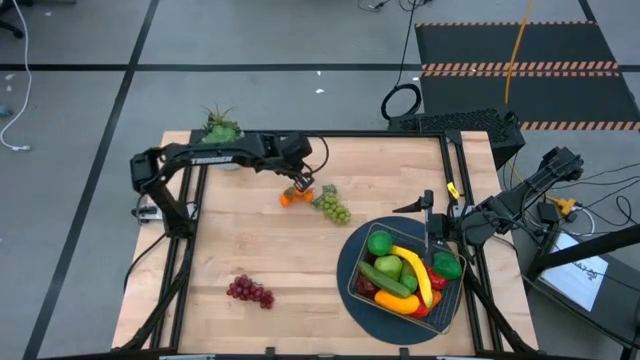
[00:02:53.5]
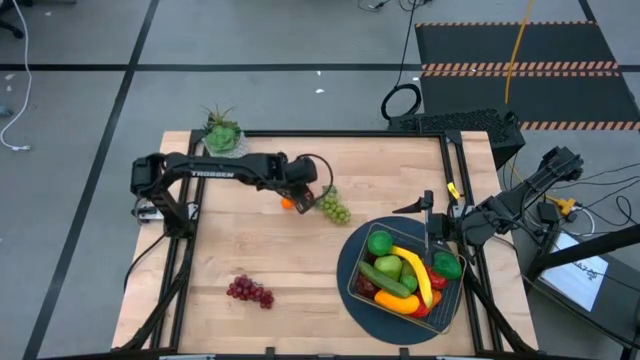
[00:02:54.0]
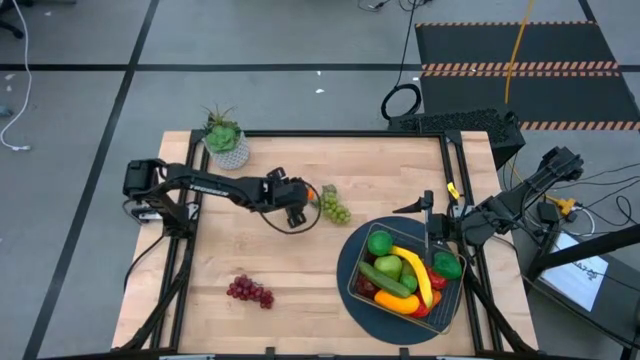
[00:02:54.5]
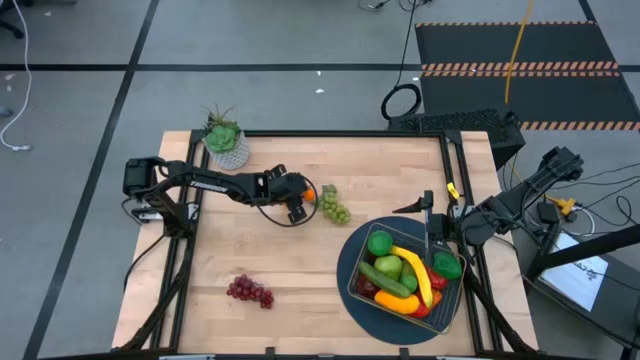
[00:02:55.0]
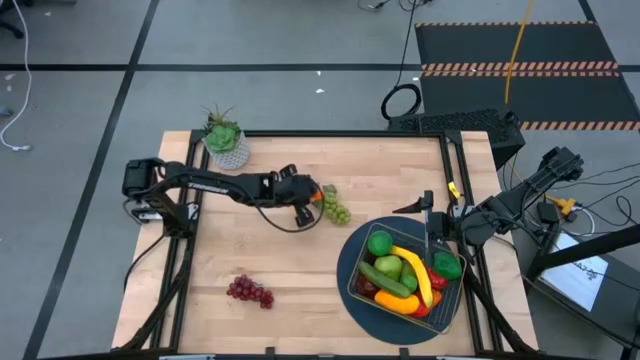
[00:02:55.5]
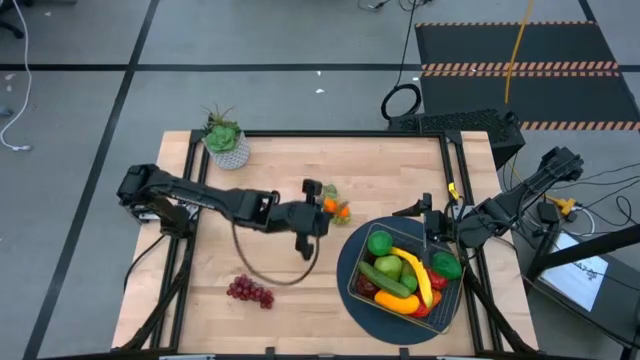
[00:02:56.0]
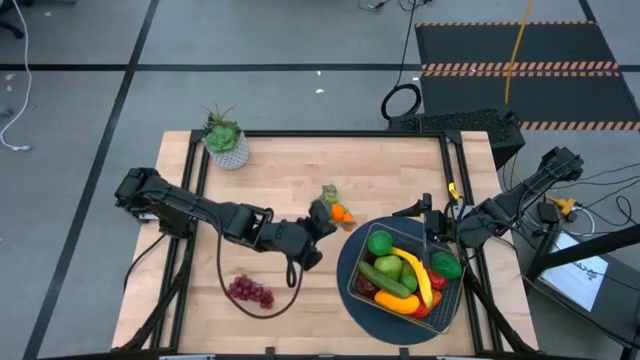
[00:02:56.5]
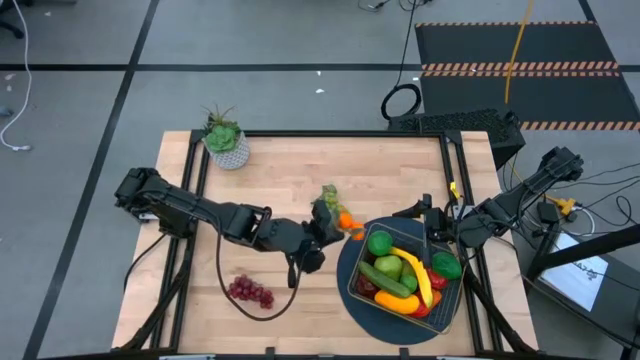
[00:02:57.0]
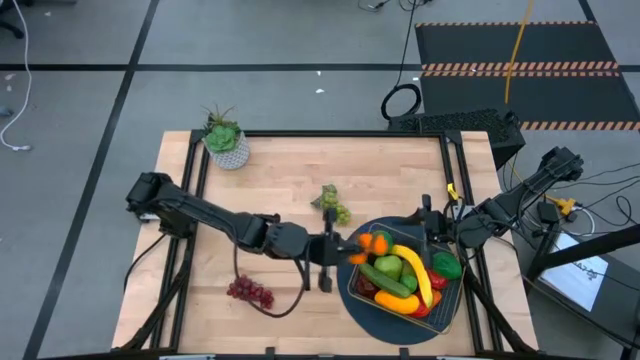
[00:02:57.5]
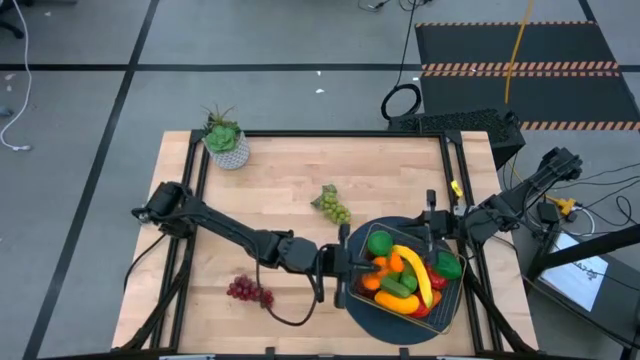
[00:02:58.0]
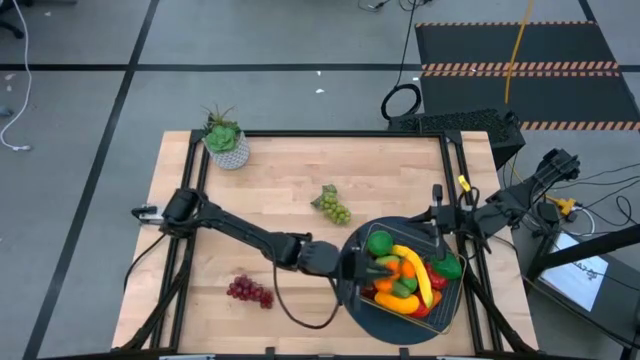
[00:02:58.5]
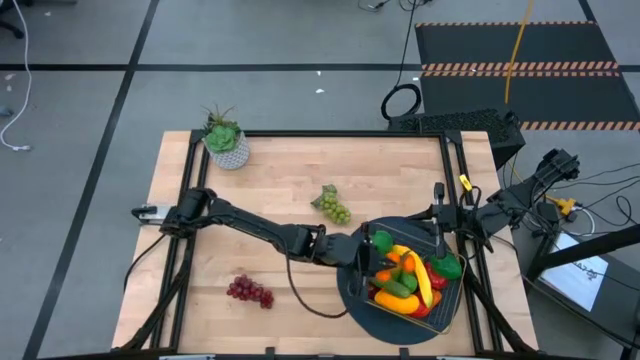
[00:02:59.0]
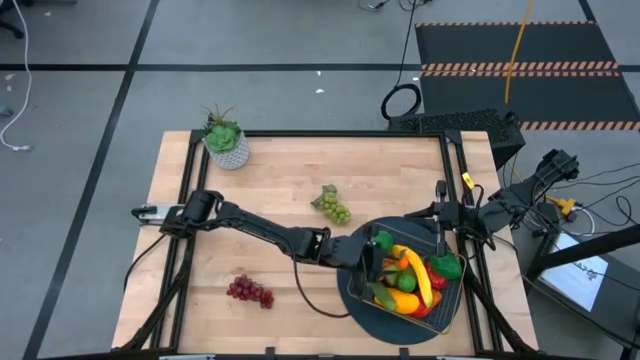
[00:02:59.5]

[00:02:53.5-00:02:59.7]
Task: Build produce basket
Put the tangerine into the gold wire basket

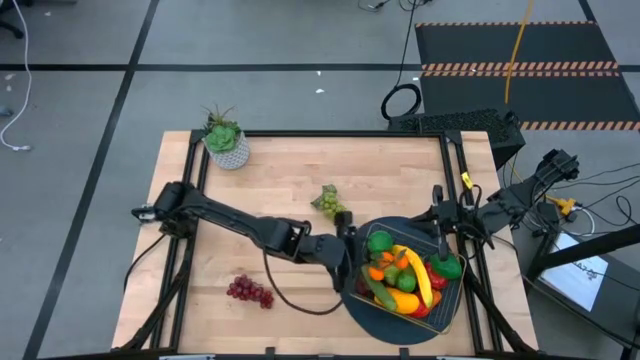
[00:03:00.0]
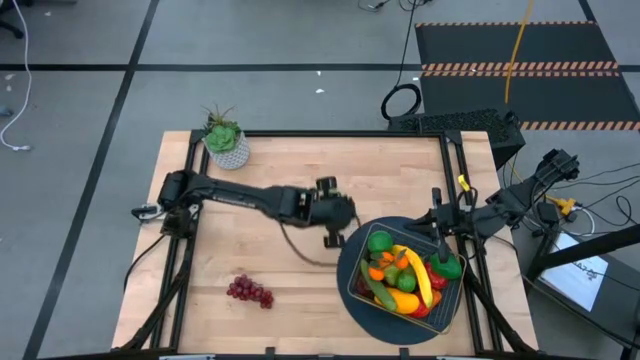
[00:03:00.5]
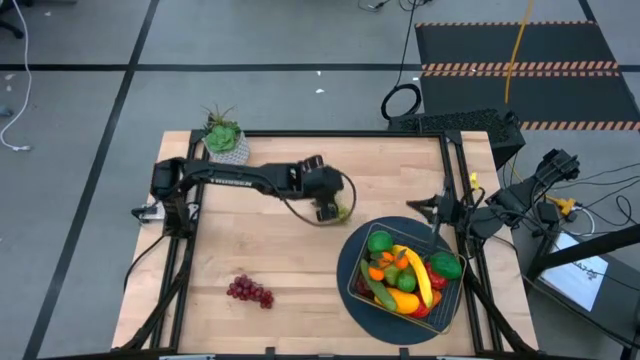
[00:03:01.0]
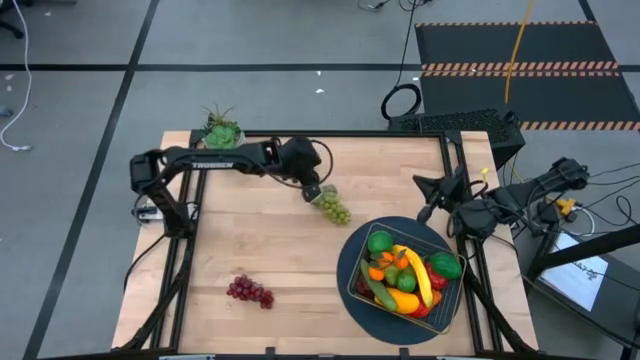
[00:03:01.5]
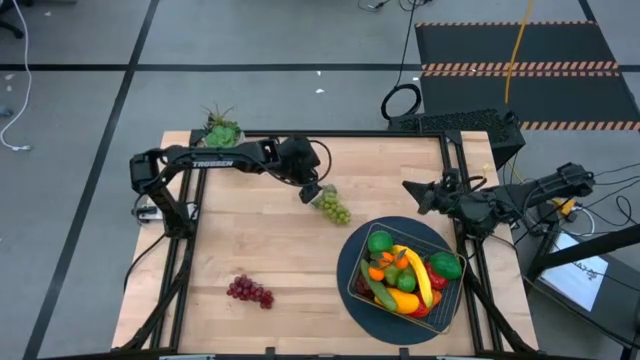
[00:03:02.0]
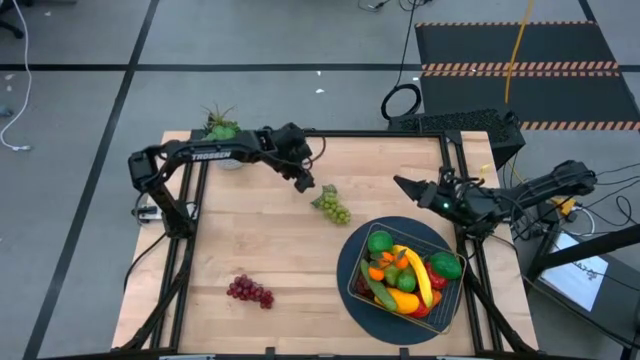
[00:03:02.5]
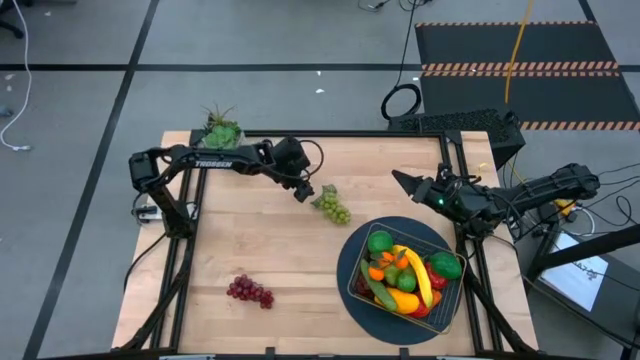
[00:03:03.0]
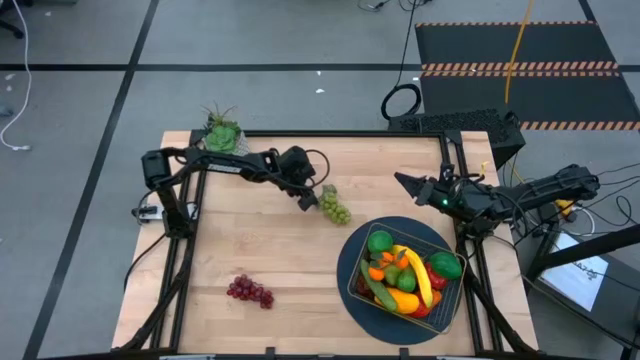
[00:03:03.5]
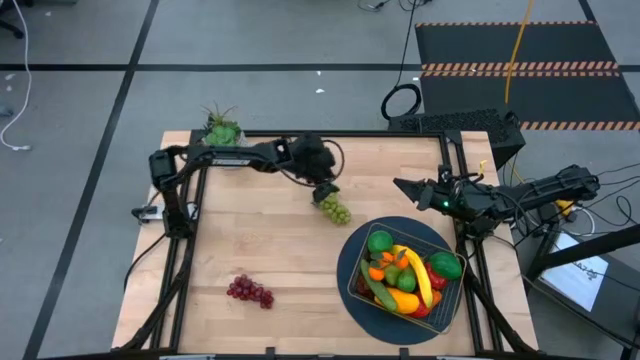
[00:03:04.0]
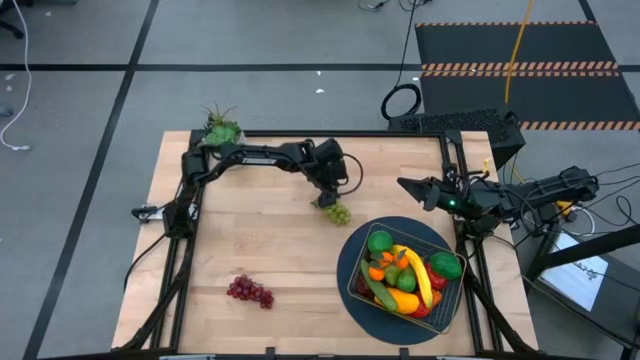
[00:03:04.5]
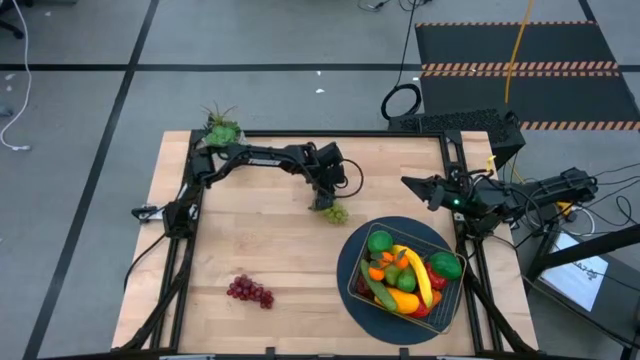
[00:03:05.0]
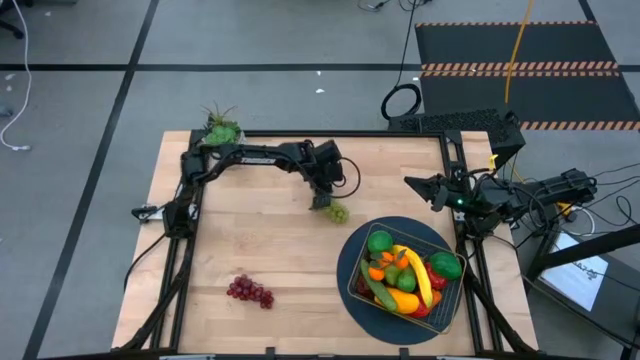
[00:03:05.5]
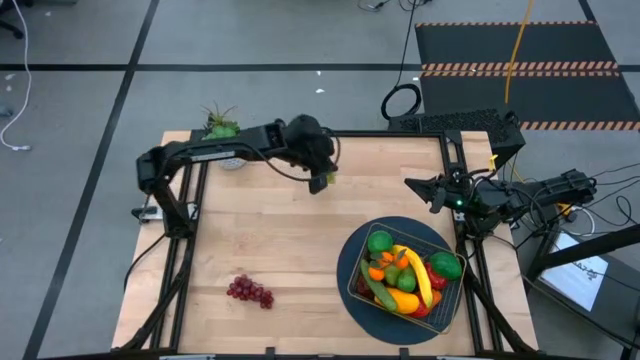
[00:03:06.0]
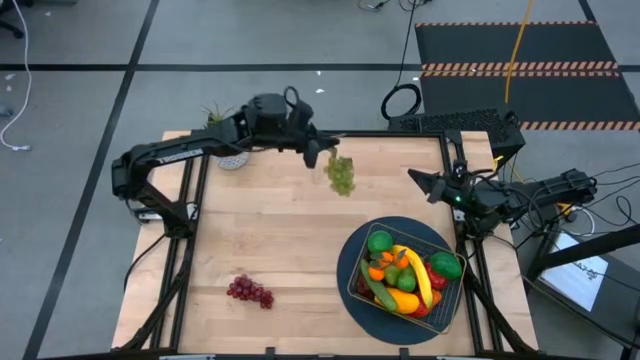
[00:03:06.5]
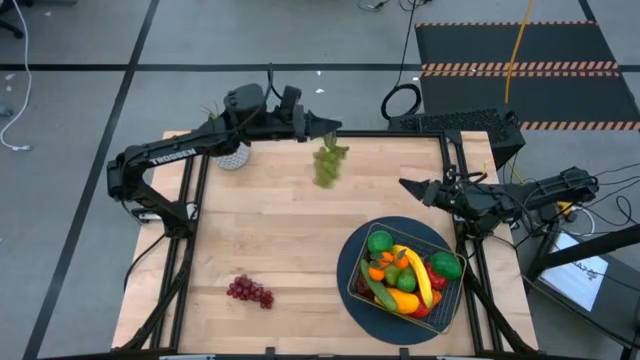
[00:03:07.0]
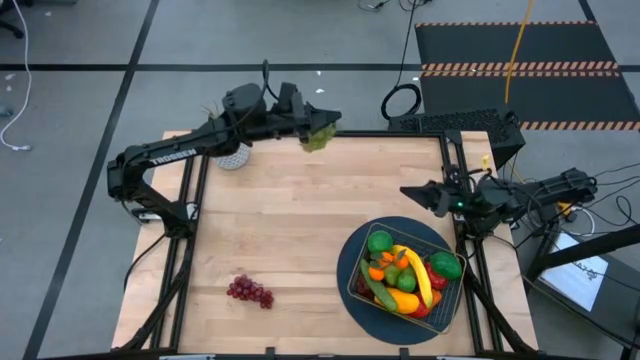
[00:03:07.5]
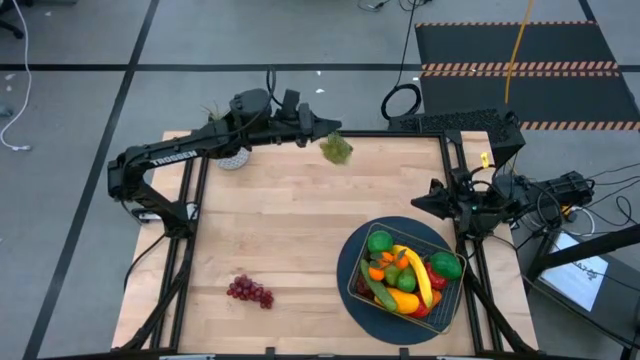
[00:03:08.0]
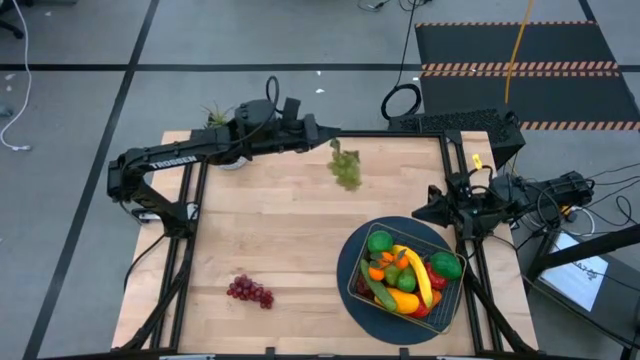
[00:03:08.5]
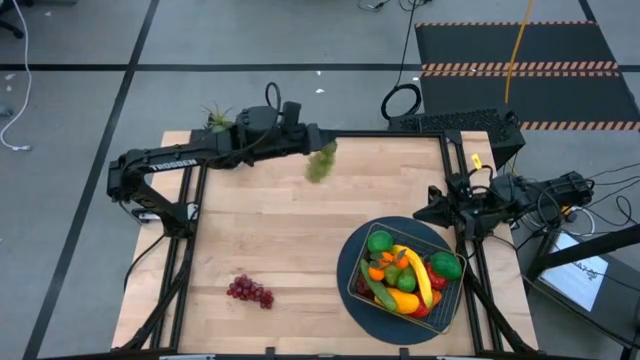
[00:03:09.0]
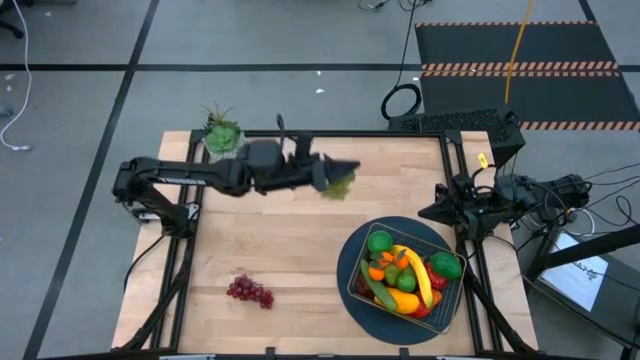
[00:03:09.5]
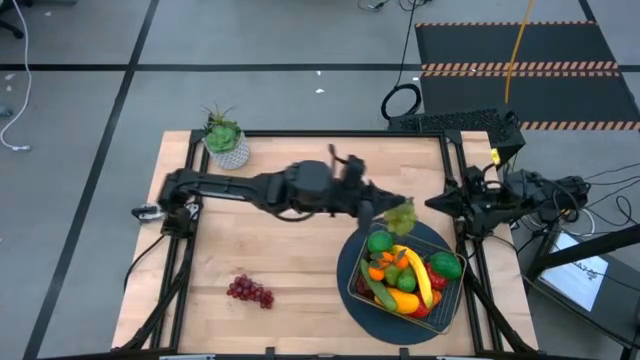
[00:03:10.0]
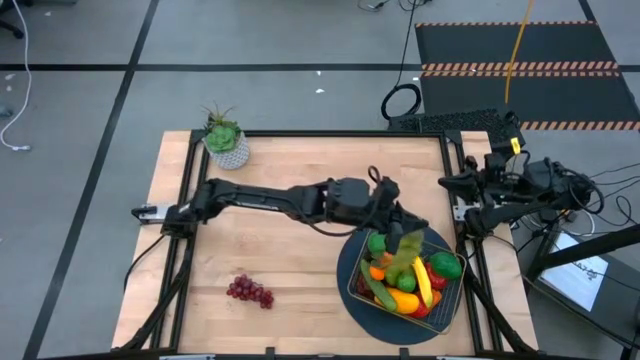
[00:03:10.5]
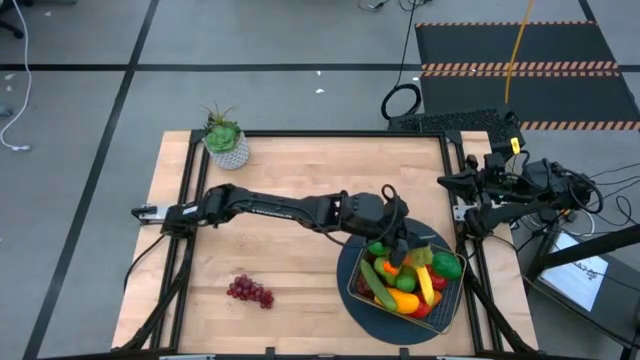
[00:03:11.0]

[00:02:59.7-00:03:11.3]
Put the top grapes into the gold wire basket

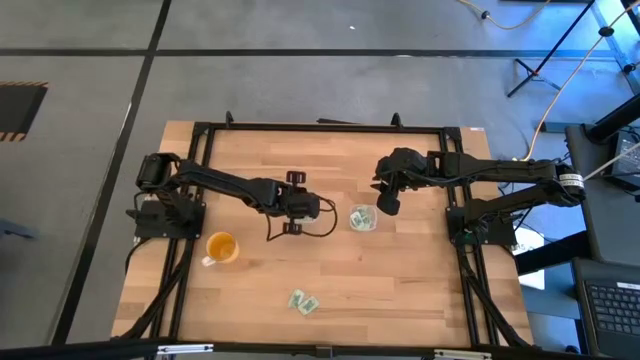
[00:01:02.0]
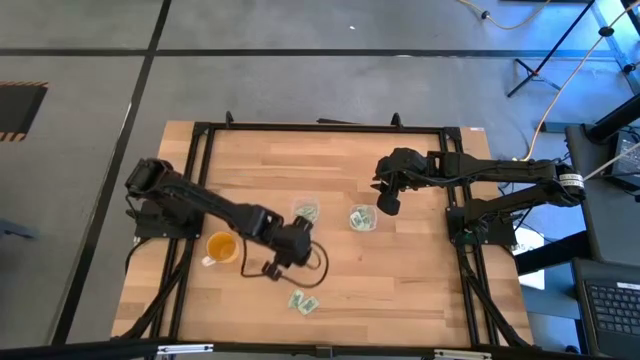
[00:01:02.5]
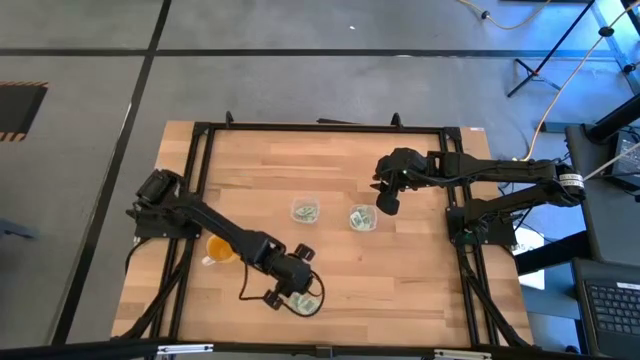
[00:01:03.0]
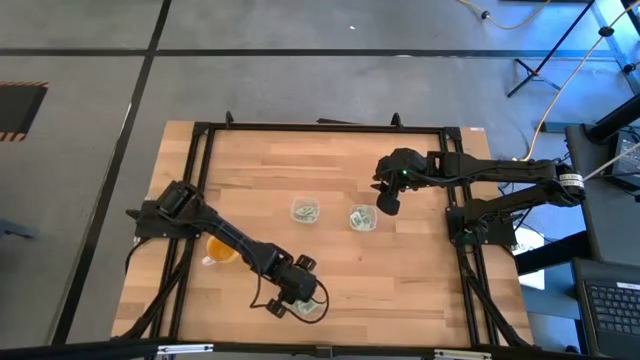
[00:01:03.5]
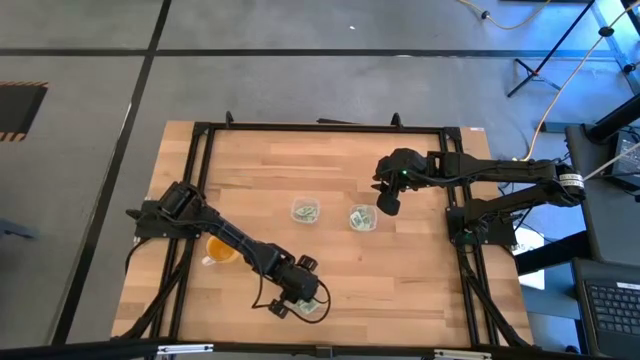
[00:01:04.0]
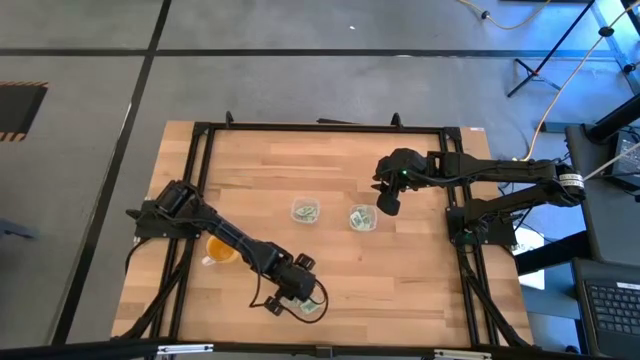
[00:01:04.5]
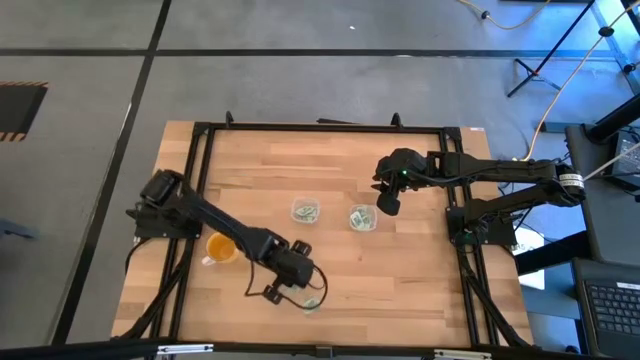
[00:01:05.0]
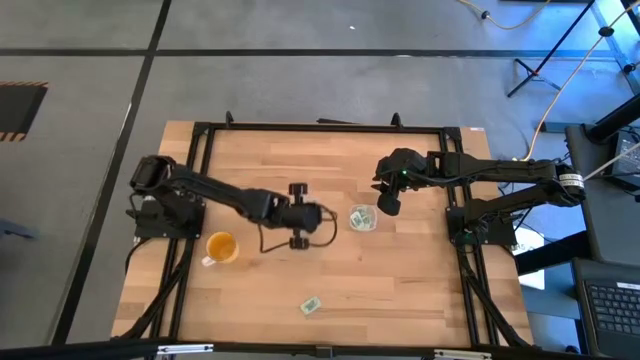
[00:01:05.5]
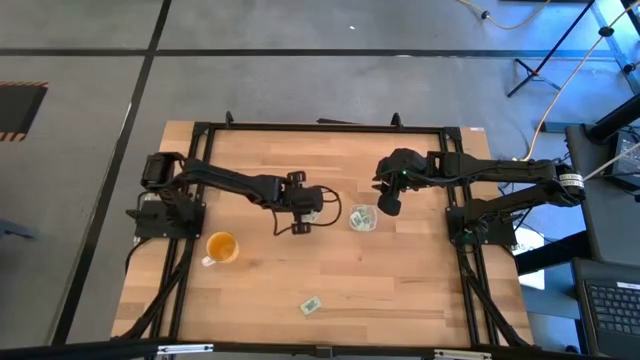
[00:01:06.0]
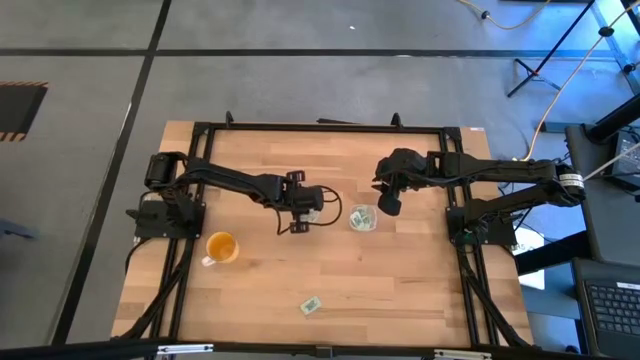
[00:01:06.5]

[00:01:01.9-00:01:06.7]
Task: Pick and place Stevia / Truvia into bins
Put the left stevia packet into the left transparent container
